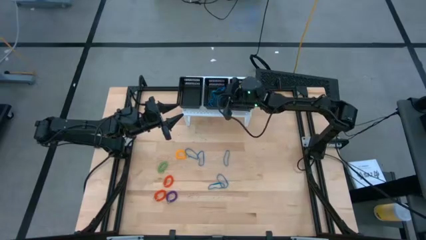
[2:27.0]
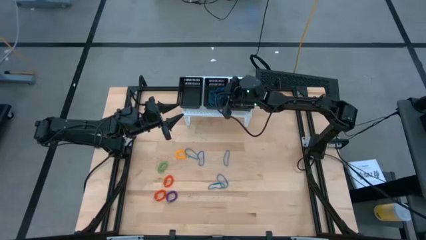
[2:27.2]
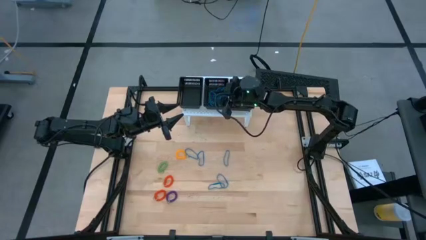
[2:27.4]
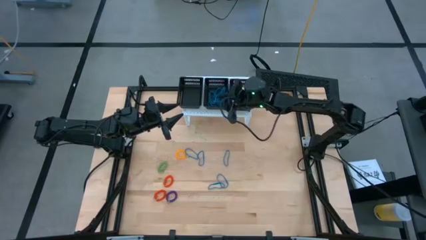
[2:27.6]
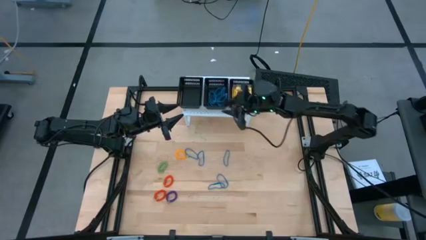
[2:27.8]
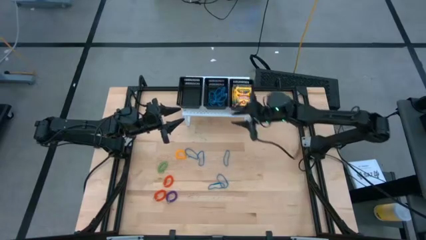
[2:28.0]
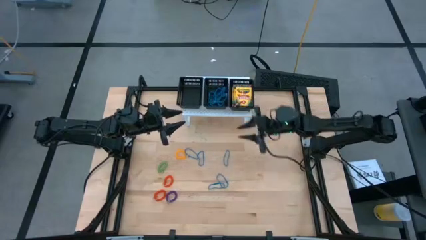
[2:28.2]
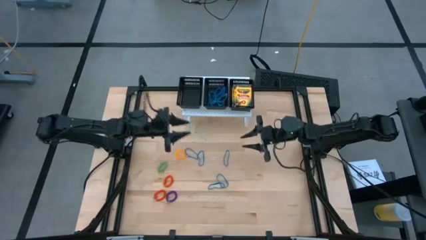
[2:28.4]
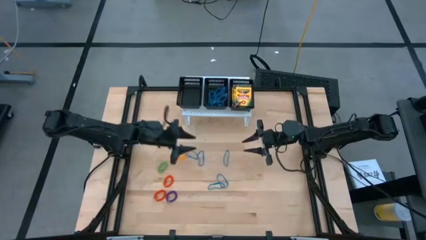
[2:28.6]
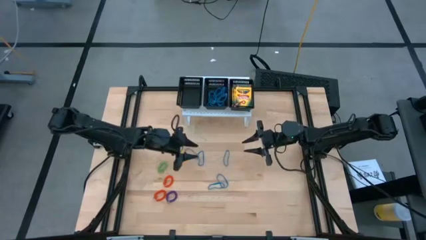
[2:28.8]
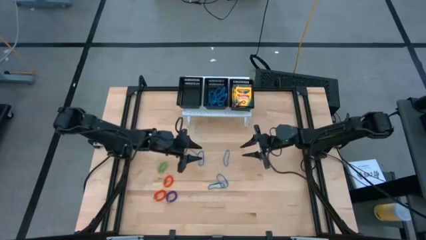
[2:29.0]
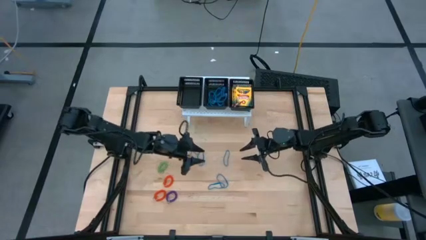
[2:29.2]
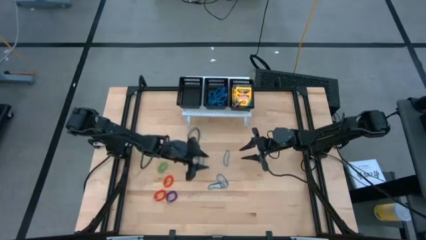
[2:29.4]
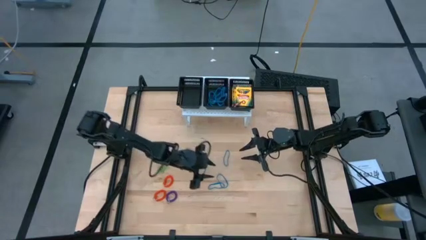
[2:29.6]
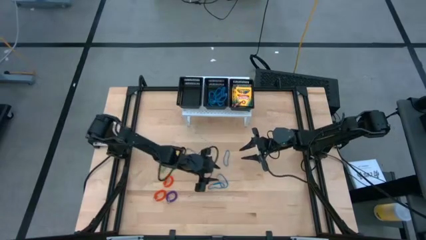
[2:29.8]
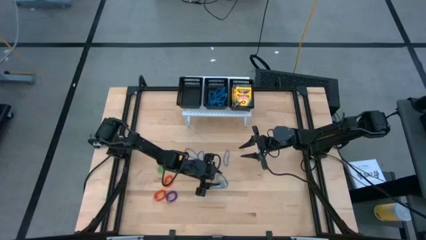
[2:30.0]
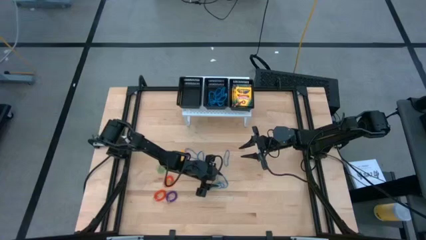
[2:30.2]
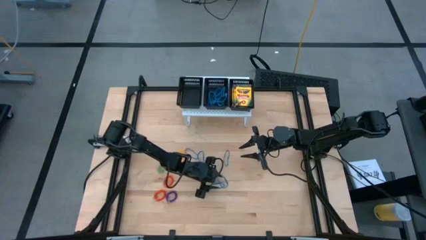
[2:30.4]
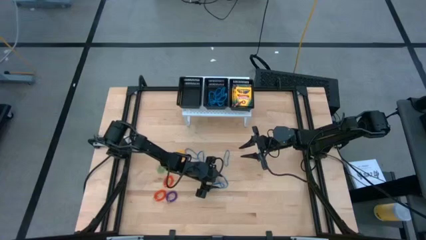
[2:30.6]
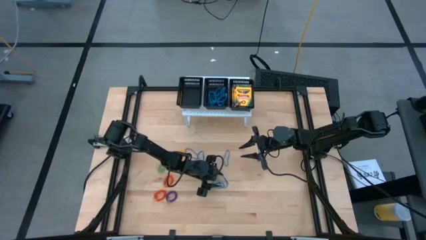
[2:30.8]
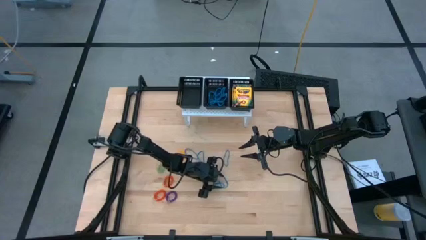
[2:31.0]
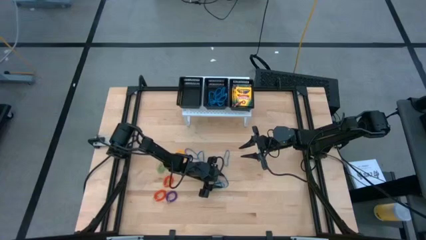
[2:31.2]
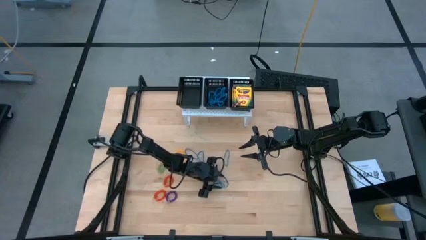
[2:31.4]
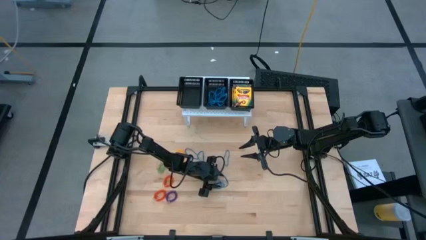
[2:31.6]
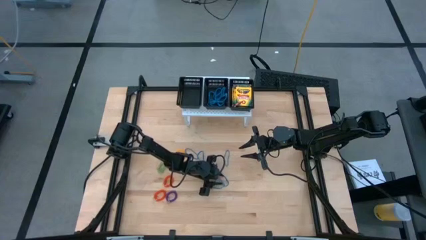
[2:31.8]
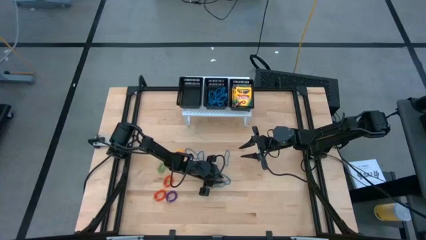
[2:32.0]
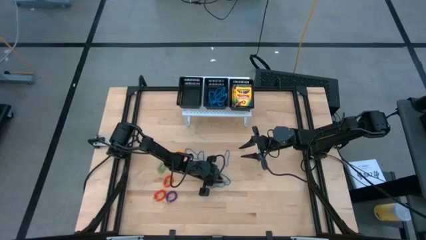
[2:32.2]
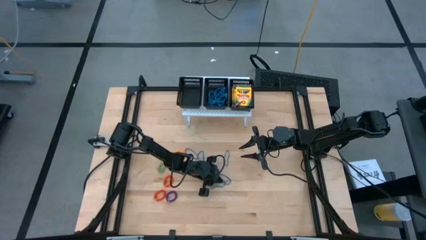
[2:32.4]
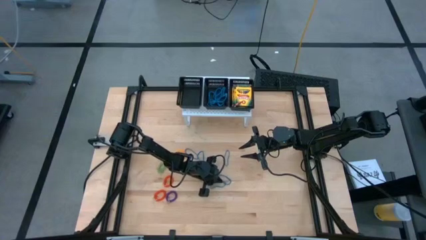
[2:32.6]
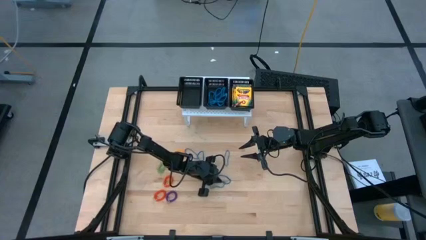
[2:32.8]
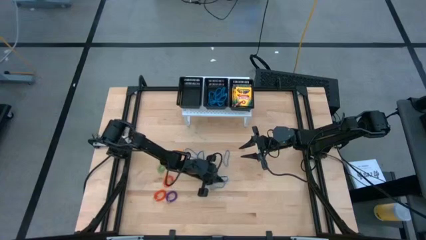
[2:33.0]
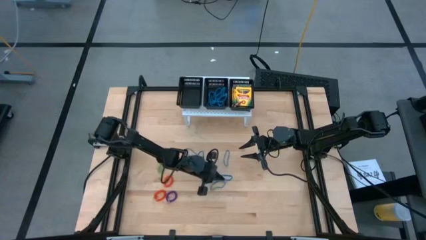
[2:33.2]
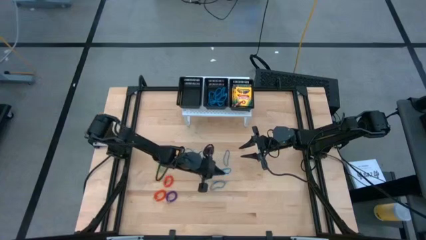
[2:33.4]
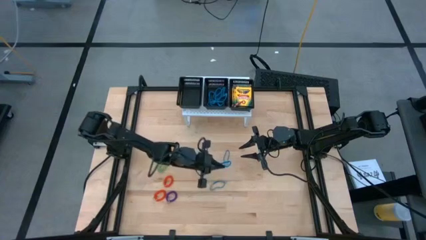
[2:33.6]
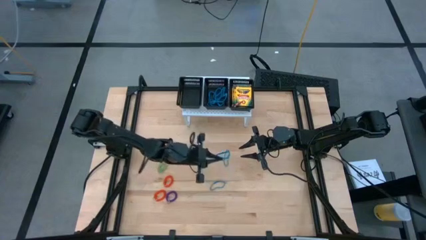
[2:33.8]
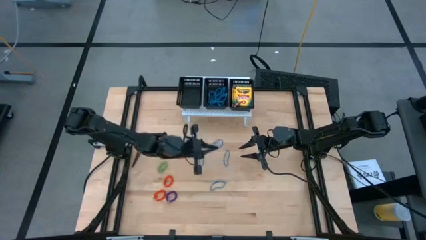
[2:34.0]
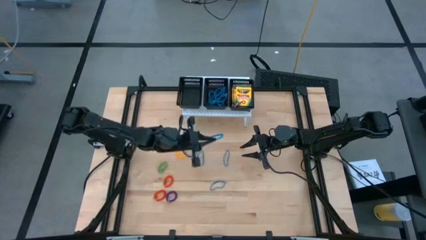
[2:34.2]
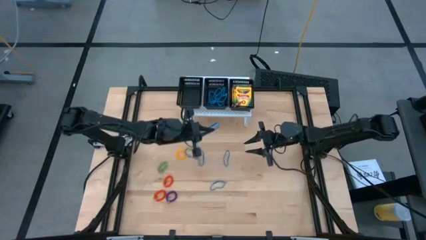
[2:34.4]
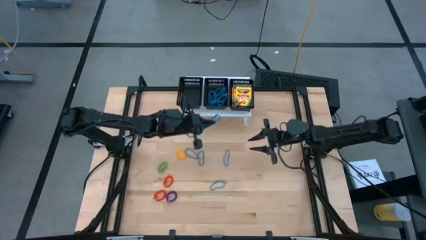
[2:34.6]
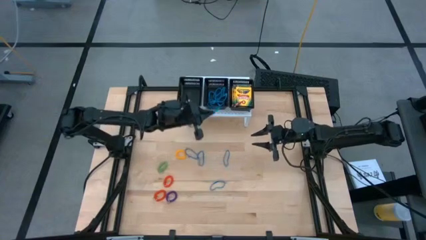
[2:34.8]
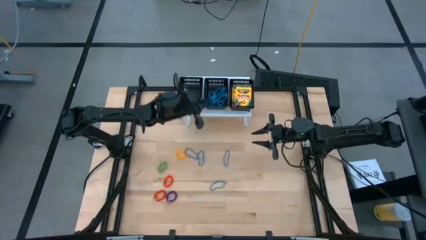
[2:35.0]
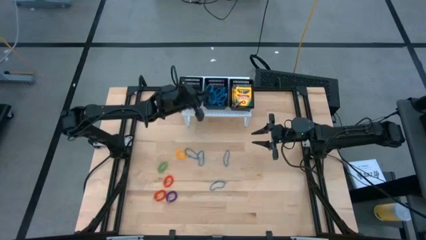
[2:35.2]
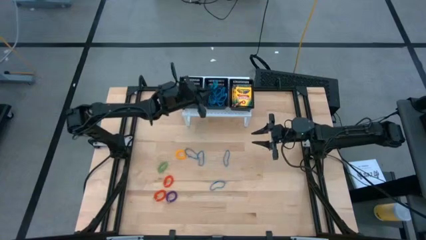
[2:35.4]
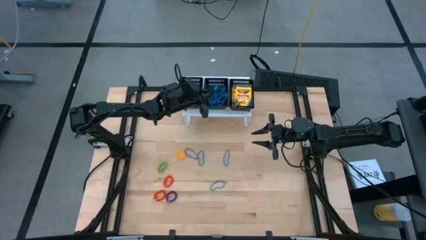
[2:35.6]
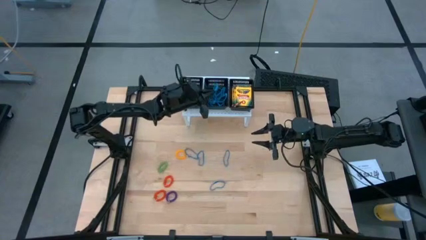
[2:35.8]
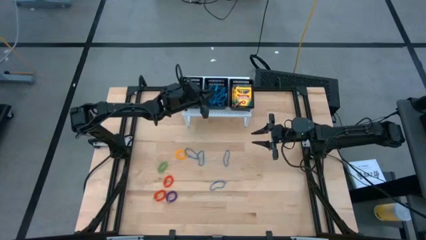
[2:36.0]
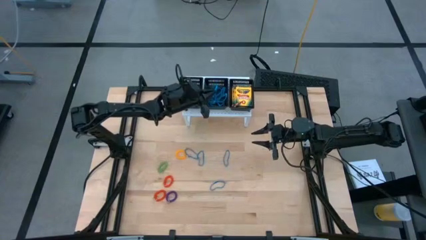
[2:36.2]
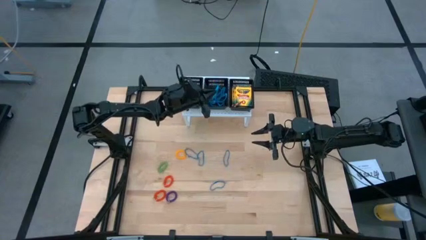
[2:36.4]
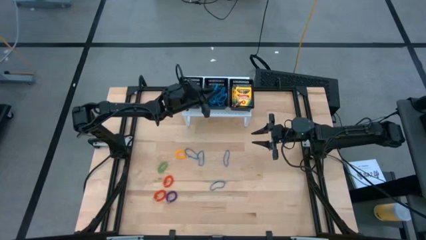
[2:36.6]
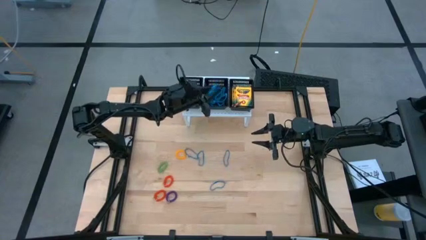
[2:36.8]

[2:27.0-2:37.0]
Task: Pick & Place Office Desk Supplies
Put the blue rubber band into the middle black bin

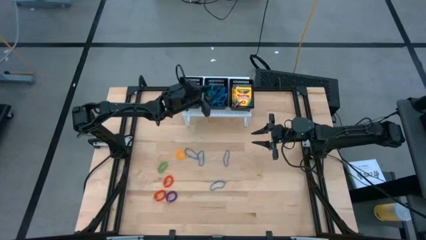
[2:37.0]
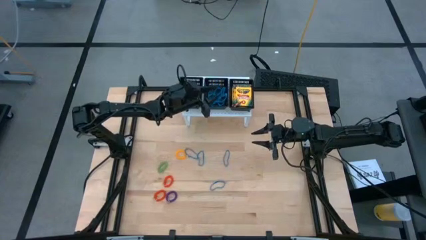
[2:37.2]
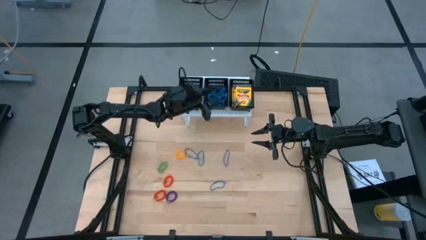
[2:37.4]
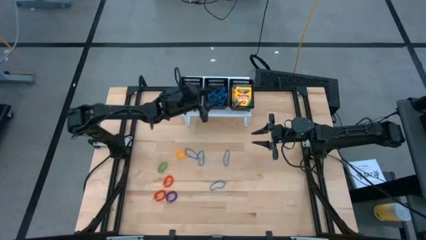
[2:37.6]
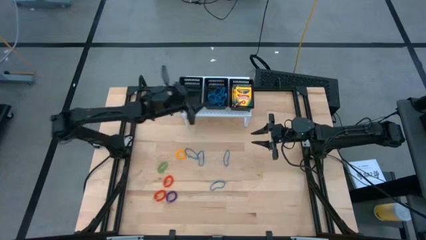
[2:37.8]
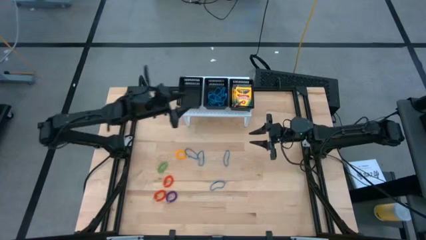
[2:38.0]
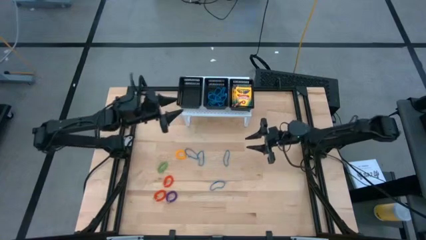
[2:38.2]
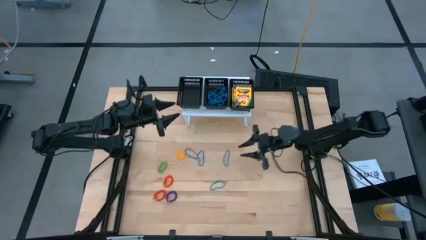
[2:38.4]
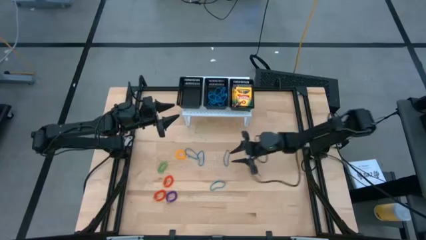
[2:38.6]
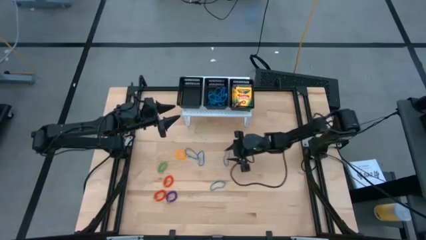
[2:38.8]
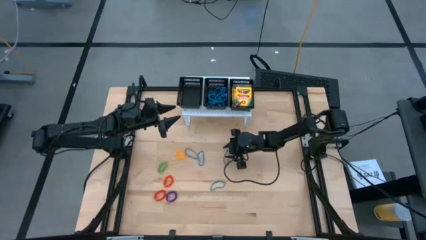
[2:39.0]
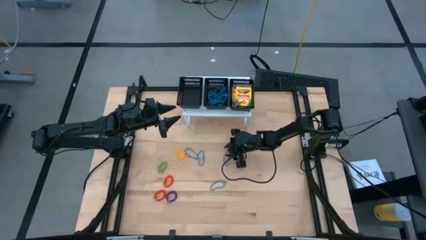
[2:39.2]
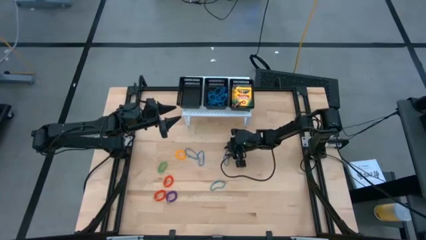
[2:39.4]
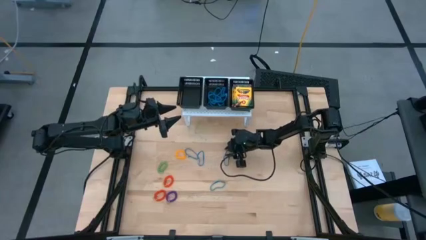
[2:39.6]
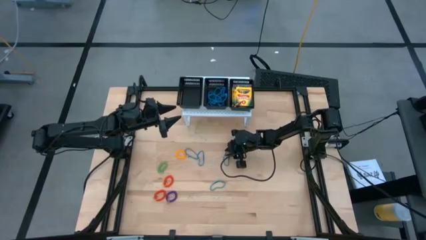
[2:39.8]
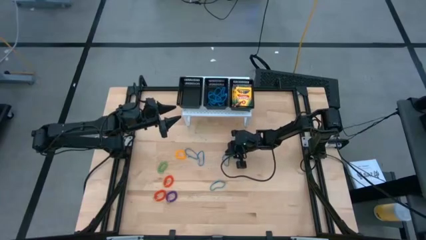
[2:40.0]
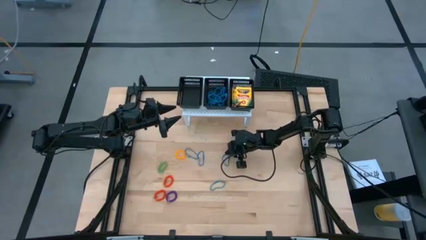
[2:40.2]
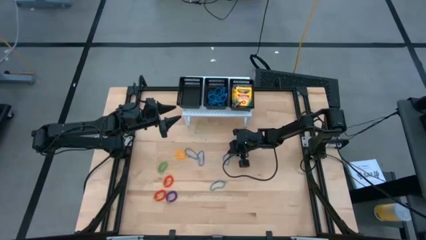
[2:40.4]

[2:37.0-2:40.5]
Put the blue rubber band into the middle black bin

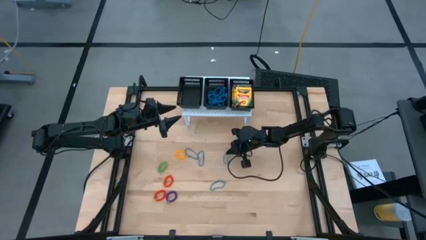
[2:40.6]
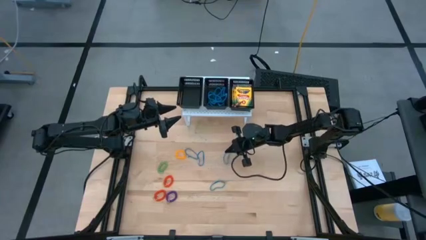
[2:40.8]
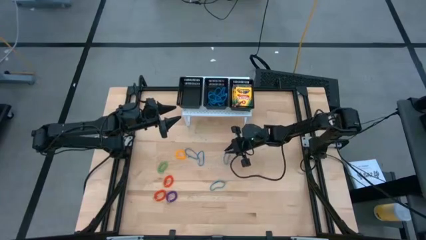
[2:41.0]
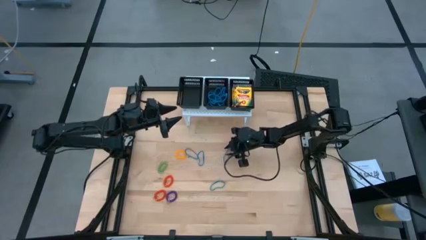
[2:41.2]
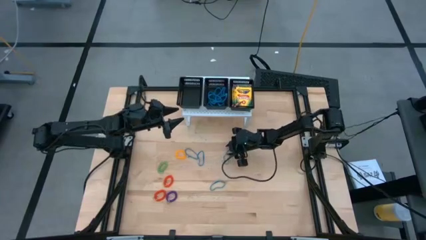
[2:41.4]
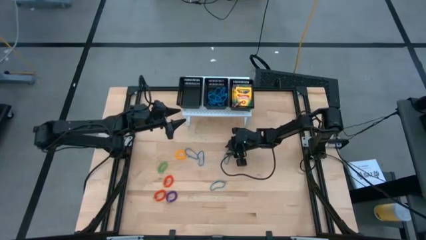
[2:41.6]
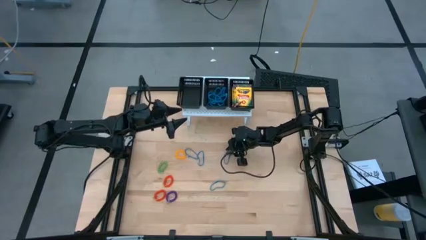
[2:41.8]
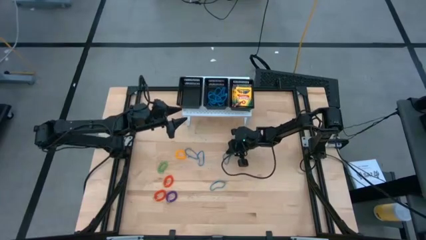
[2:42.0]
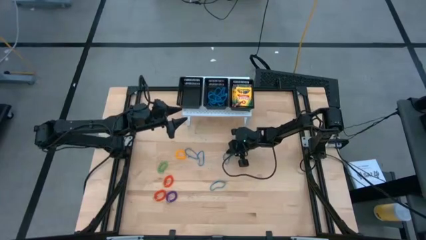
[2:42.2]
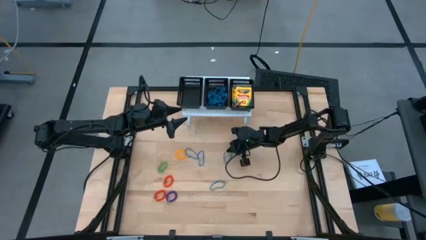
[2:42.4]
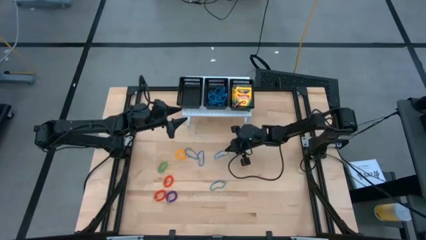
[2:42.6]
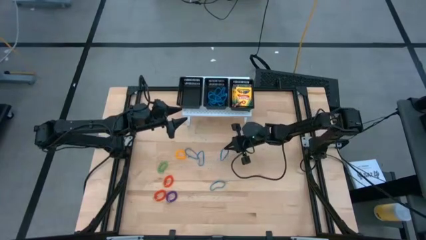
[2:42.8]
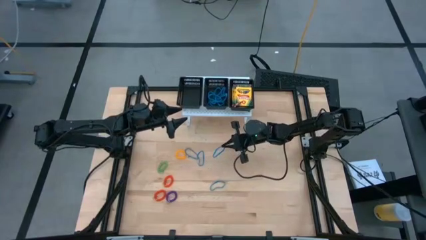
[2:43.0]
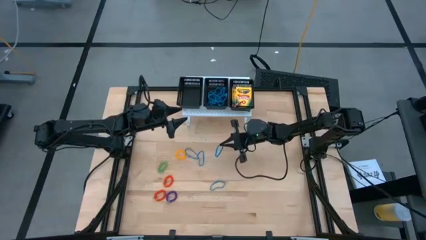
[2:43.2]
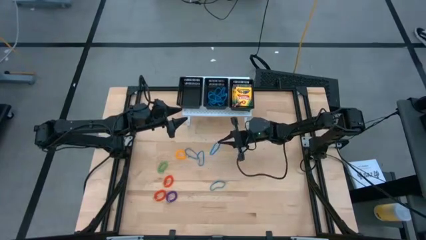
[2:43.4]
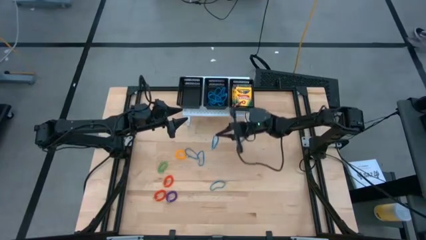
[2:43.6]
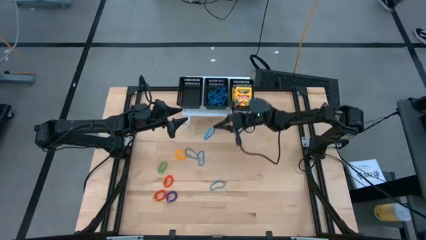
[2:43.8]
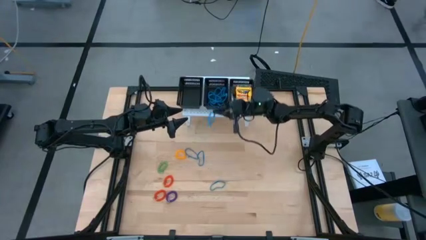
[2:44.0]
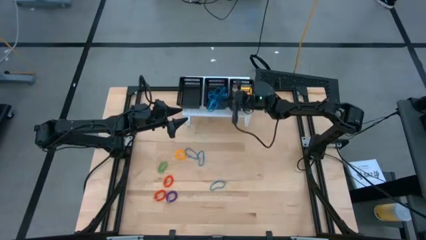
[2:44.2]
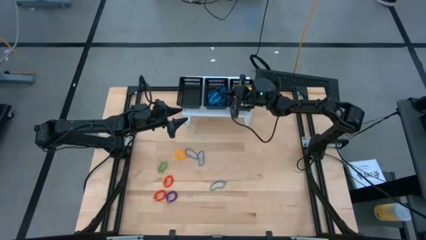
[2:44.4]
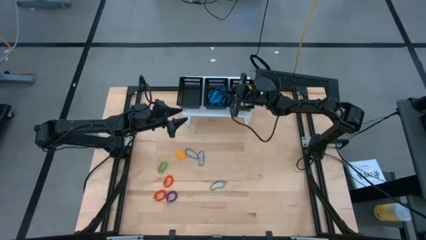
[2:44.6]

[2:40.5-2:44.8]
Put the blue rubber band into the middle black bin
